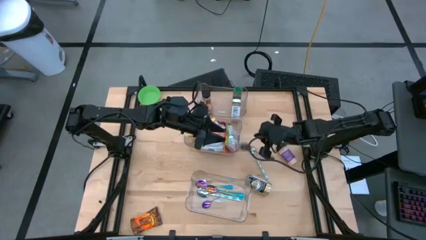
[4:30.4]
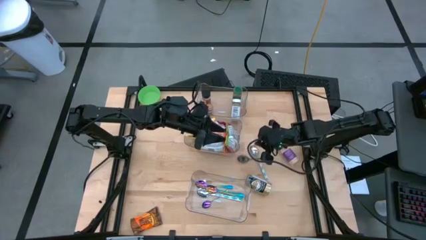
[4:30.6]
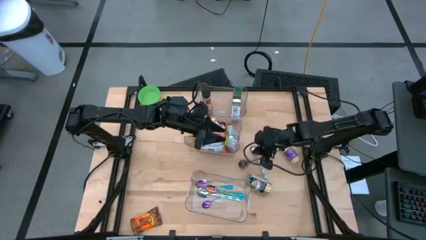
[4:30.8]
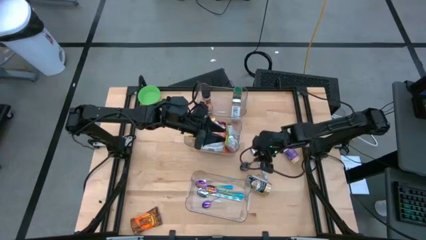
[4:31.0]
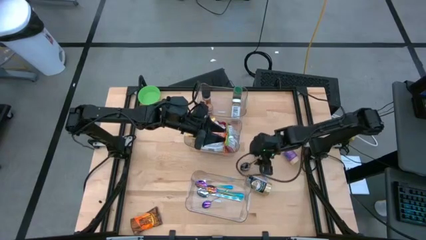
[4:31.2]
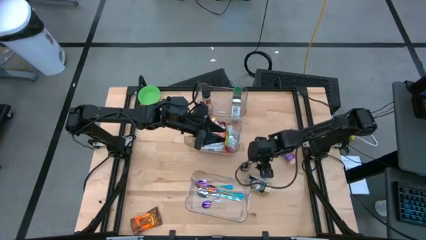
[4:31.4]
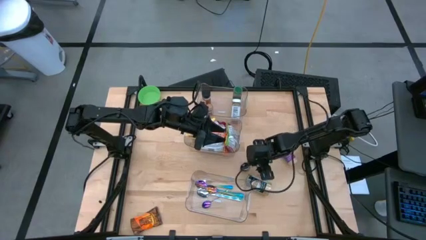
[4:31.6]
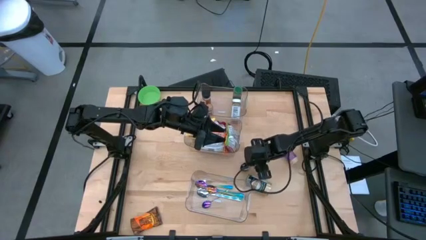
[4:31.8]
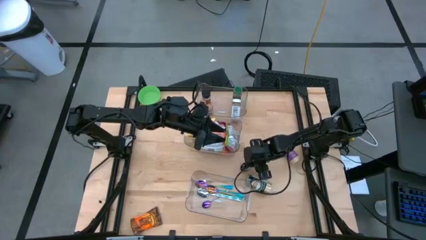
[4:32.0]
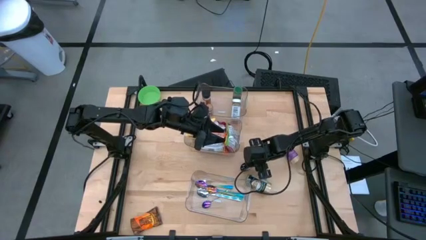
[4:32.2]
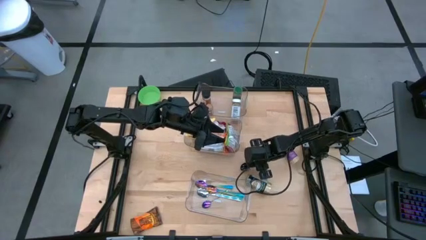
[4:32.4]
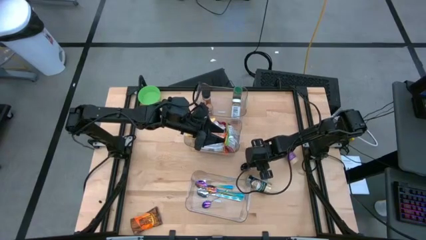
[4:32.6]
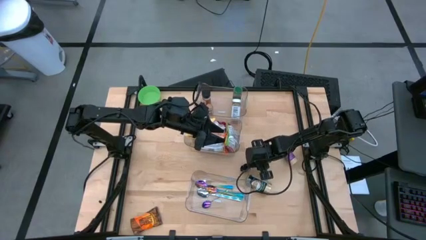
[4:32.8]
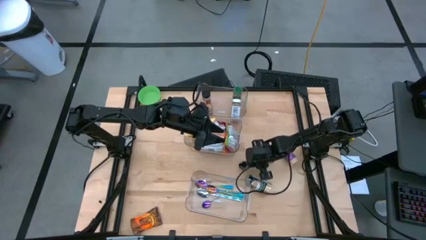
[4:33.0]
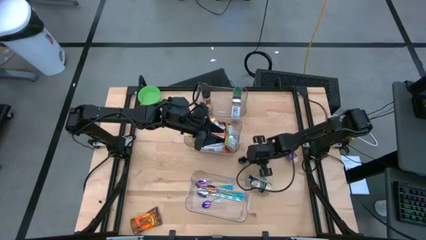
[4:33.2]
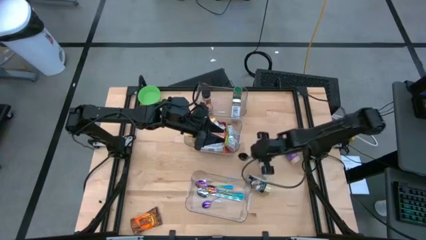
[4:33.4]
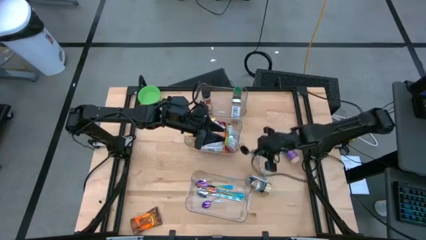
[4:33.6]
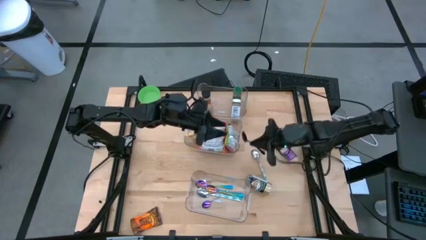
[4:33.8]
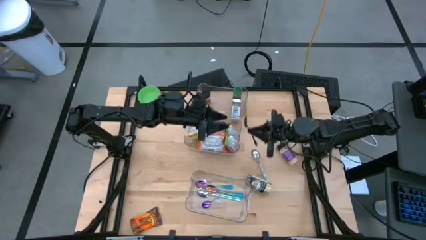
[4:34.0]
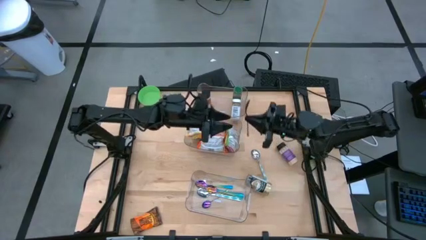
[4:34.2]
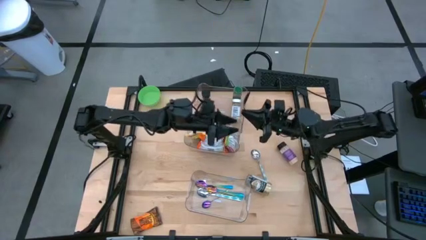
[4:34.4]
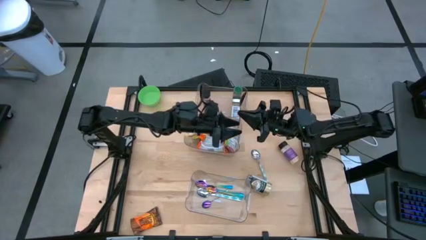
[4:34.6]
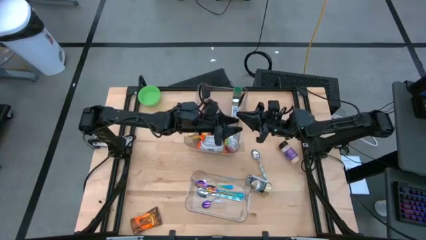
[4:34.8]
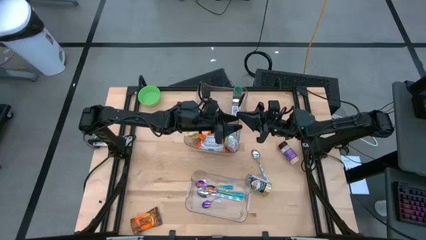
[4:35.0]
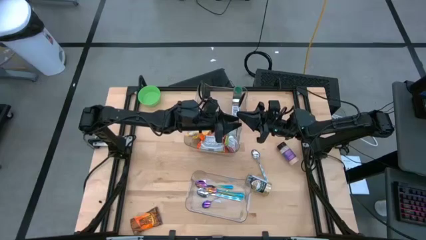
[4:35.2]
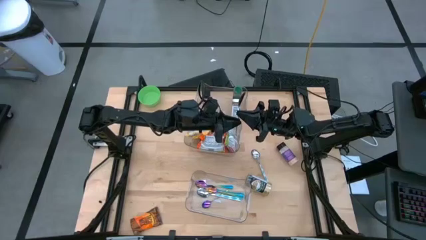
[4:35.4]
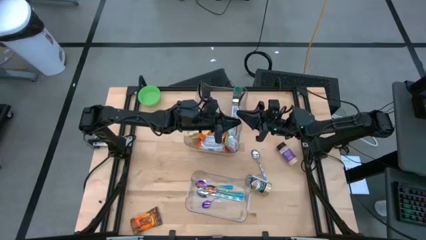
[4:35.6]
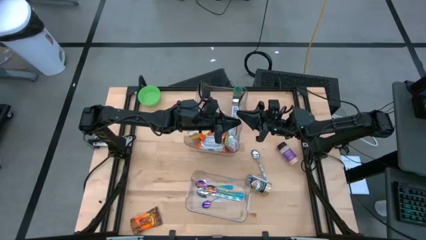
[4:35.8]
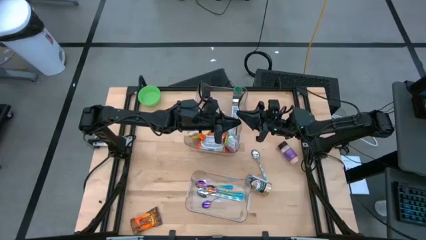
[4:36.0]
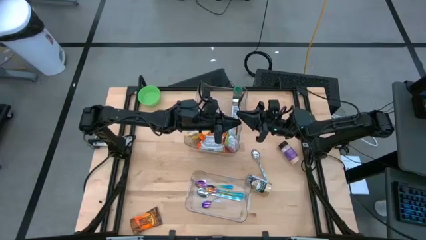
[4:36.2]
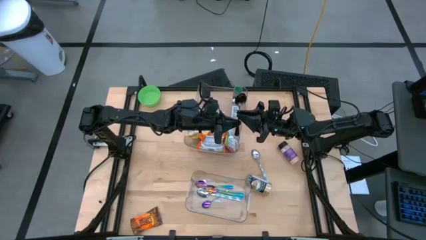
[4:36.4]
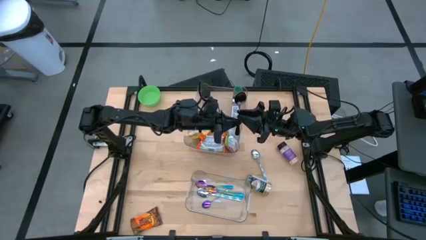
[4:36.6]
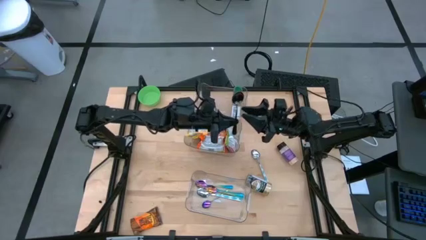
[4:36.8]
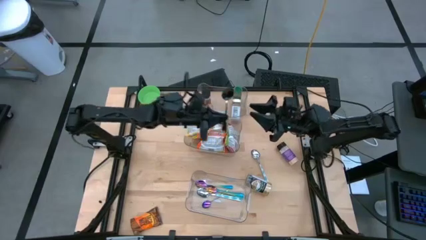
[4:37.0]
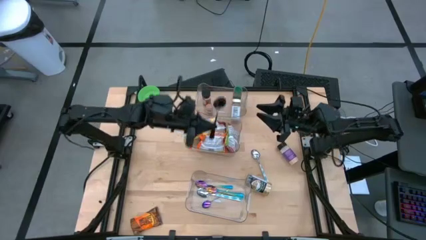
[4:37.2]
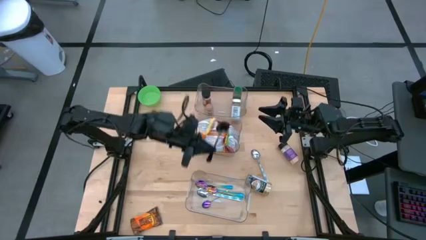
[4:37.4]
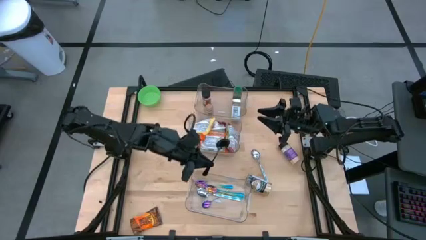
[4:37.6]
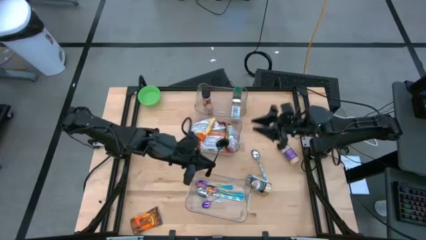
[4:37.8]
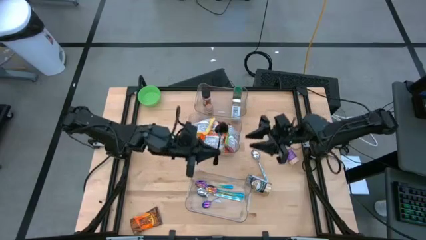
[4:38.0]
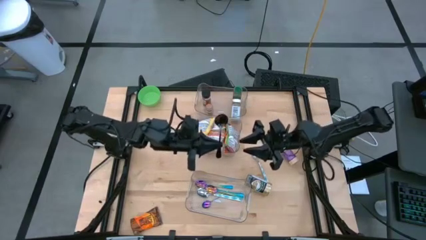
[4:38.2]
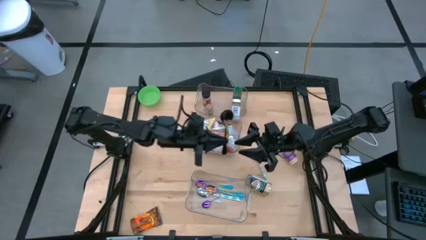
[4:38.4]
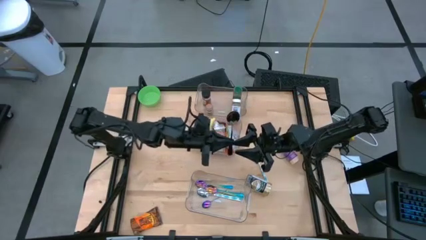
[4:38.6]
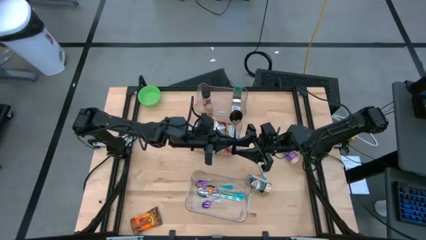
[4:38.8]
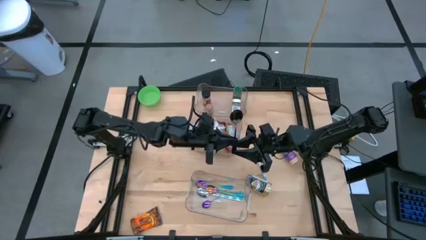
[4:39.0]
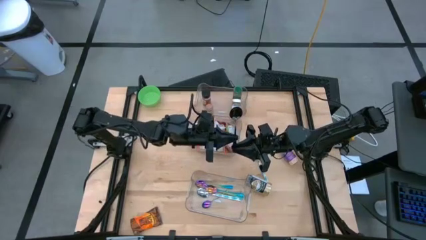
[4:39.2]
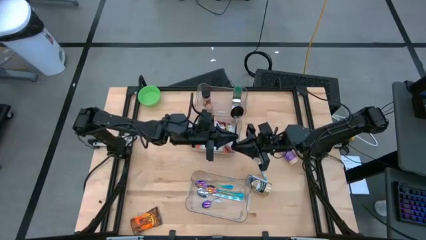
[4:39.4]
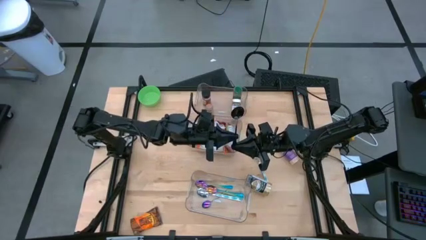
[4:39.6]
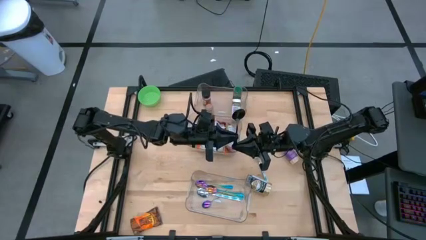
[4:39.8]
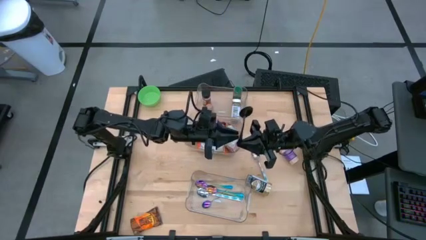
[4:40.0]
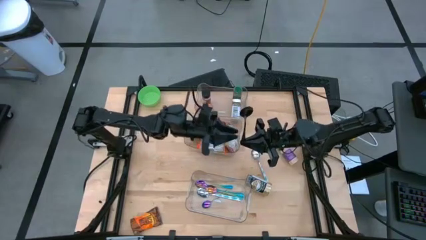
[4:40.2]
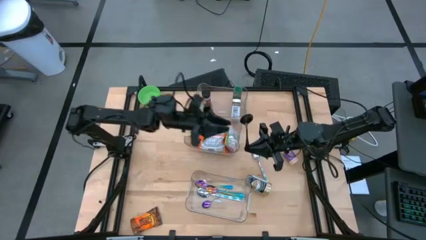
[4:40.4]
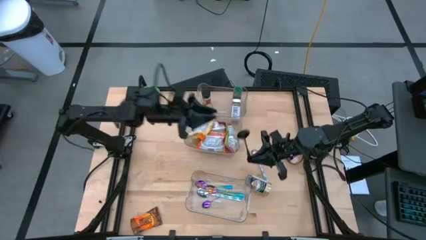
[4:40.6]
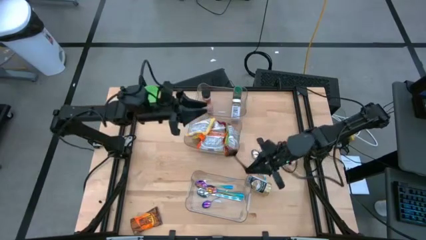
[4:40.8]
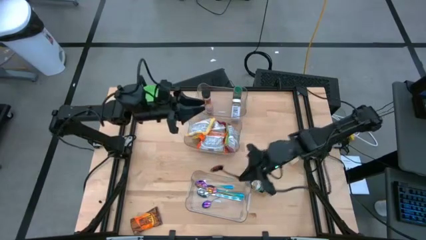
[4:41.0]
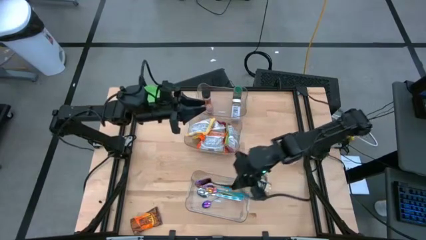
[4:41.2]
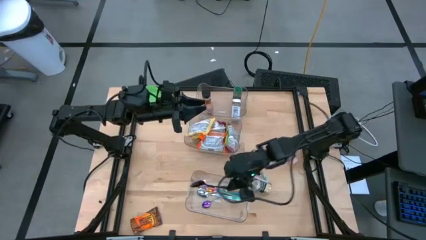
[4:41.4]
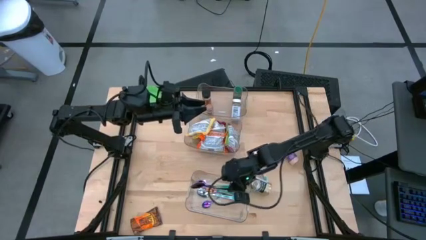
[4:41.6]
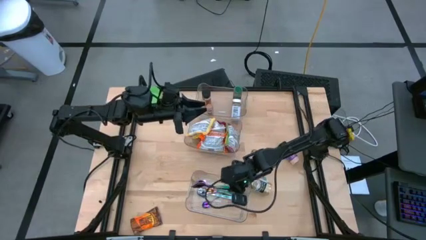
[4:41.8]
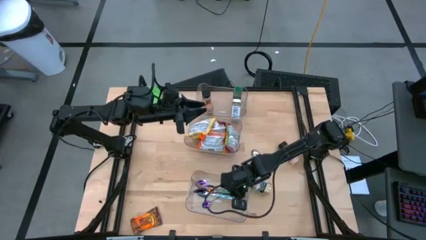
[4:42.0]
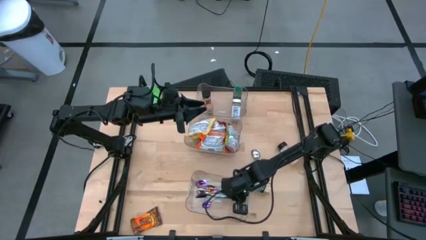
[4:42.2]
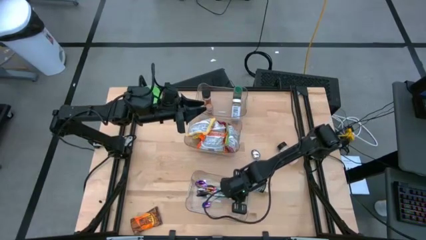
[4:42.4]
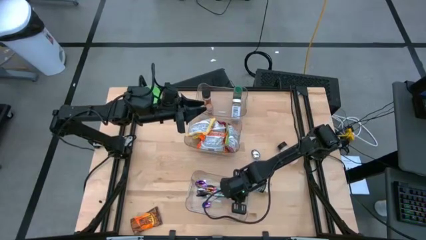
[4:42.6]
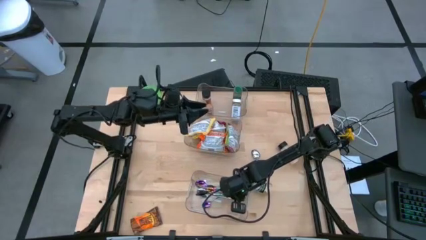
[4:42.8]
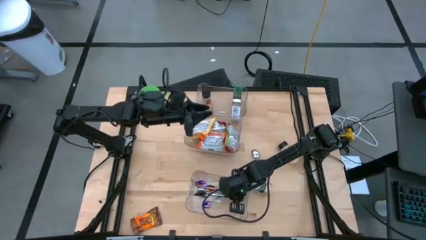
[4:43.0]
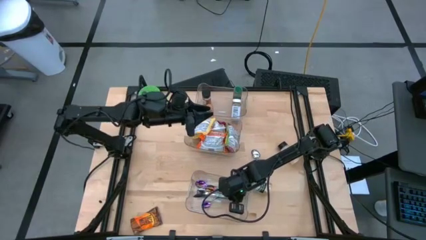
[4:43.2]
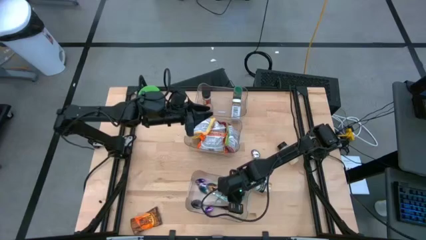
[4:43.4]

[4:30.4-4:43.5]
Task: Pick & Place Food Item
Put the black spoon into the bottom transparent bin
